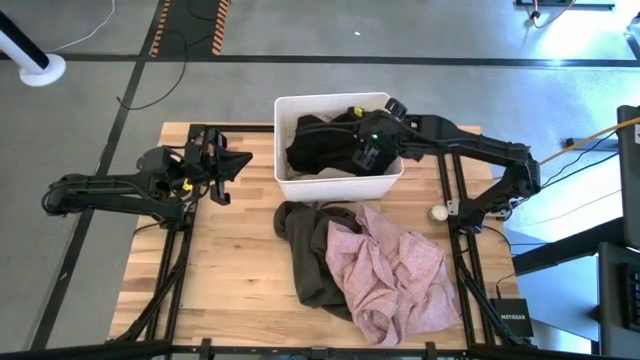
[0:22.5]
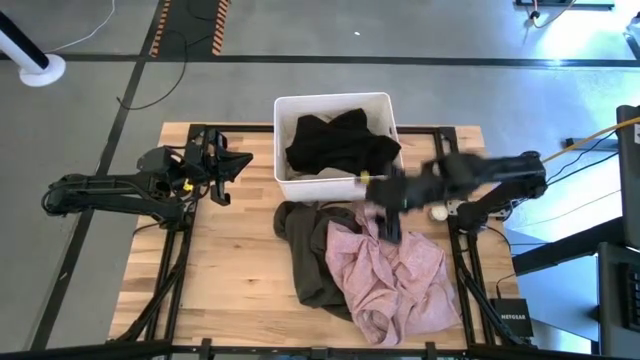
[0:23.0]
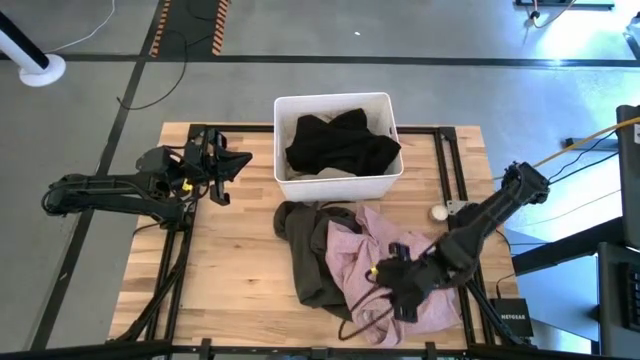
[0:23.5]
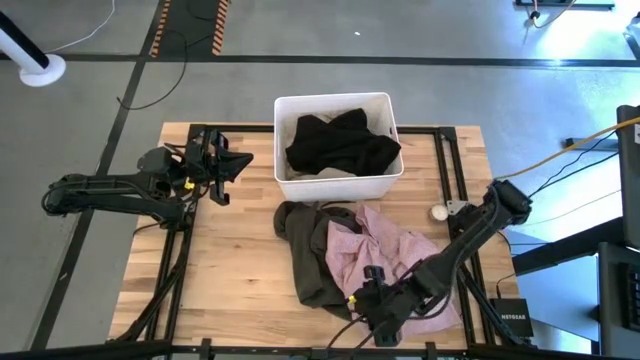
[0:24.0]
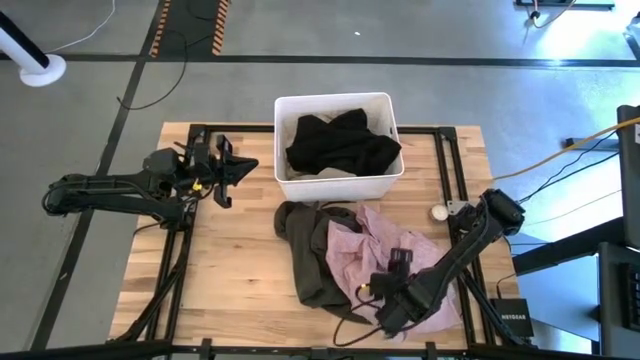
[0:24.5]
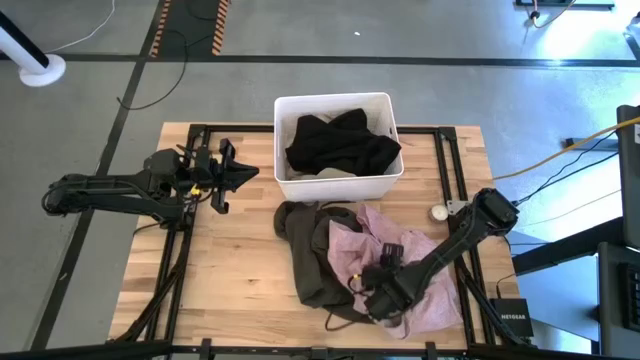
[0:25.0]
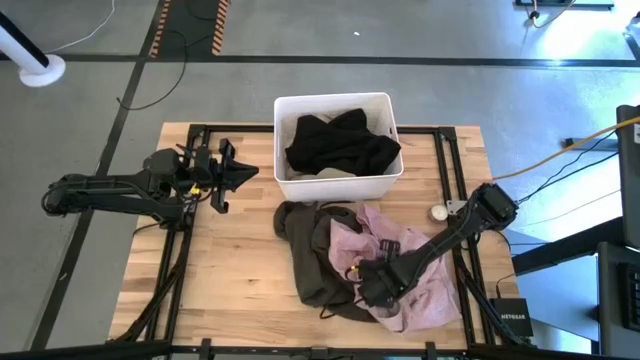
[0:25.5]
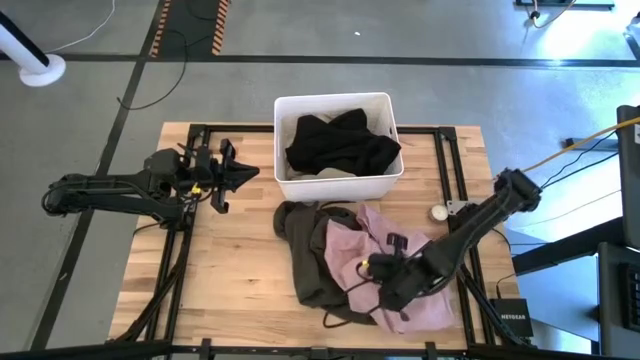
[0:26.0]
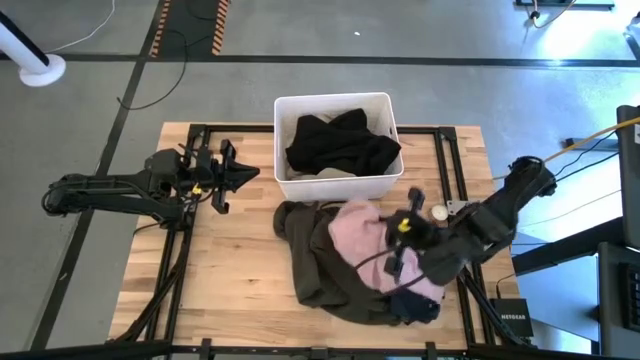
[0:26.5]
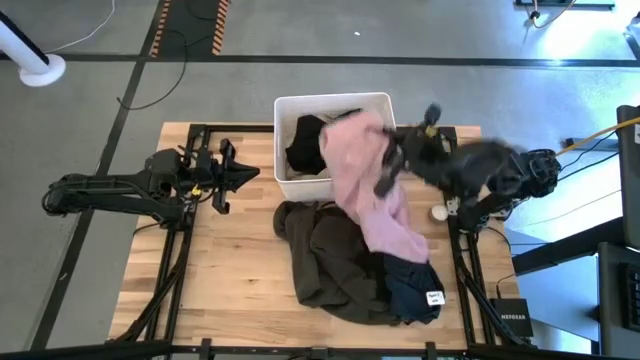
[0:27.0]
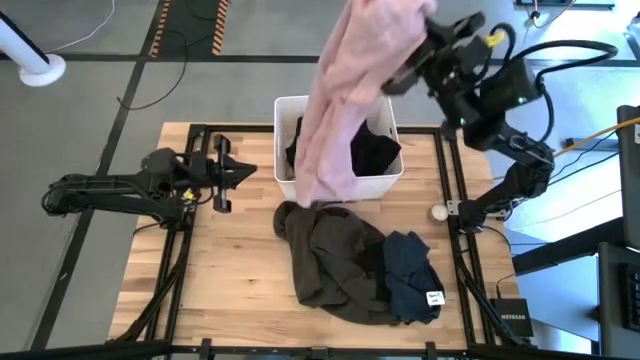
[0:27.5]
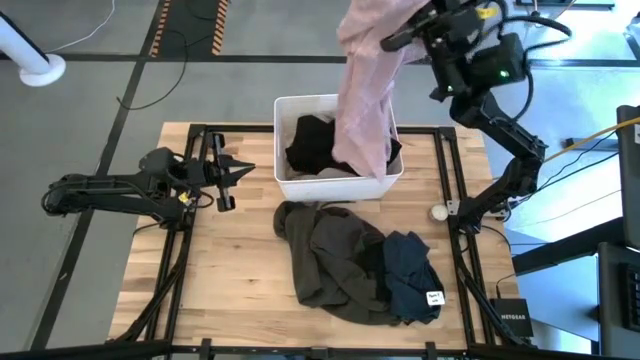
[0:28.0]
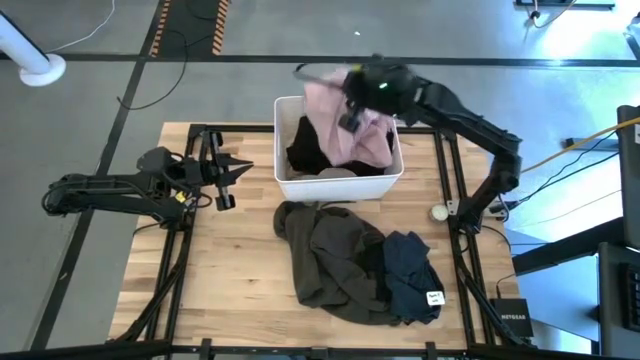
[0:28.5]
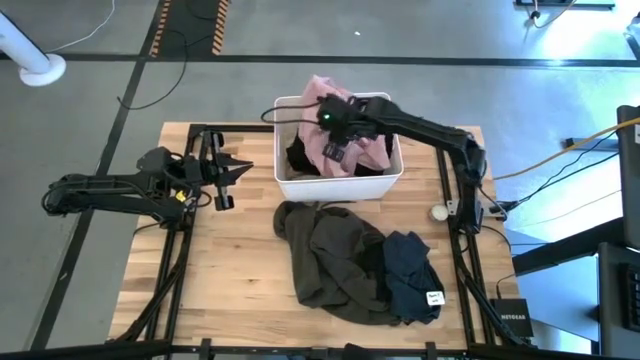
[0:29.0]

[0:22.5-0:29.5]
Task: Sort clothes
Put the pink shirt into the white laundry bin

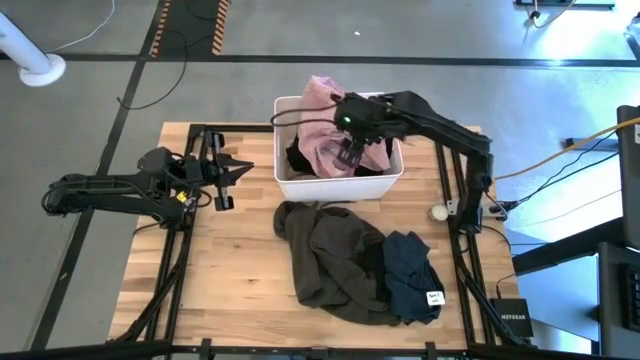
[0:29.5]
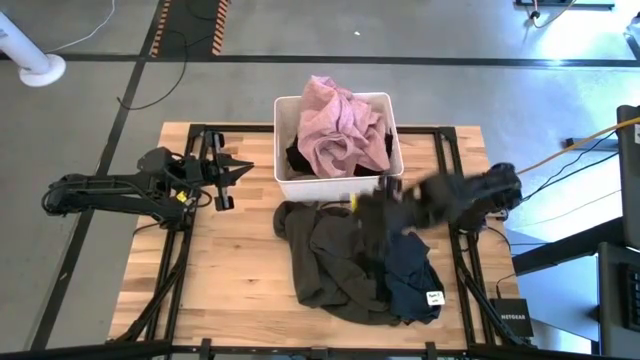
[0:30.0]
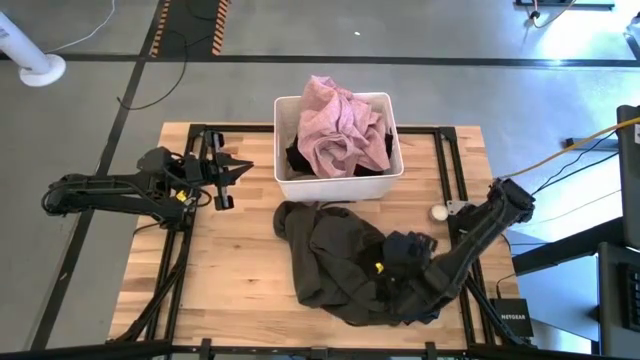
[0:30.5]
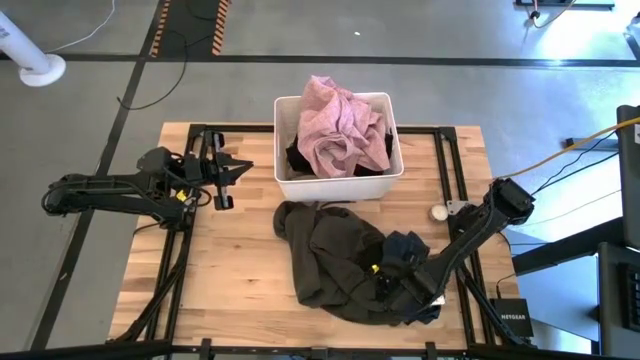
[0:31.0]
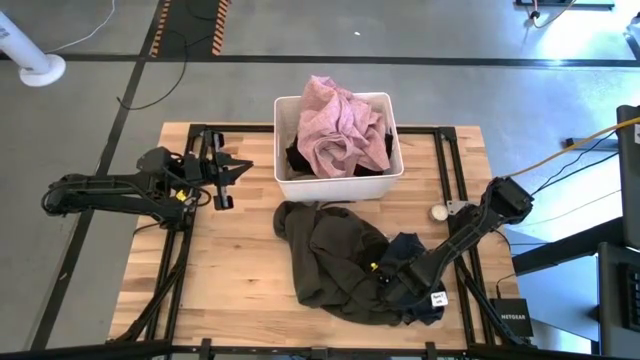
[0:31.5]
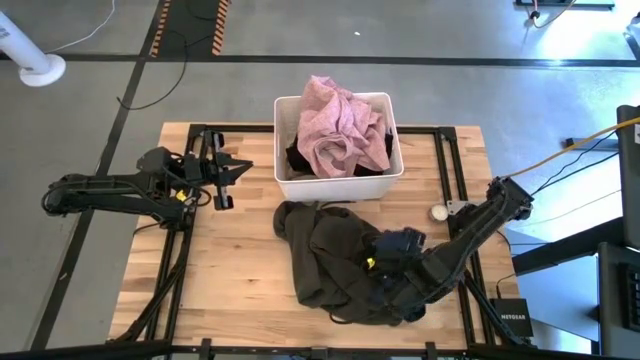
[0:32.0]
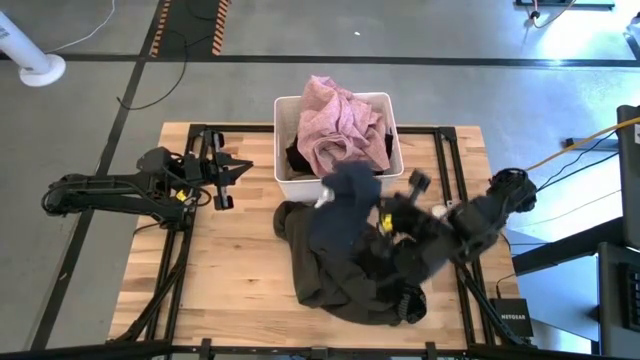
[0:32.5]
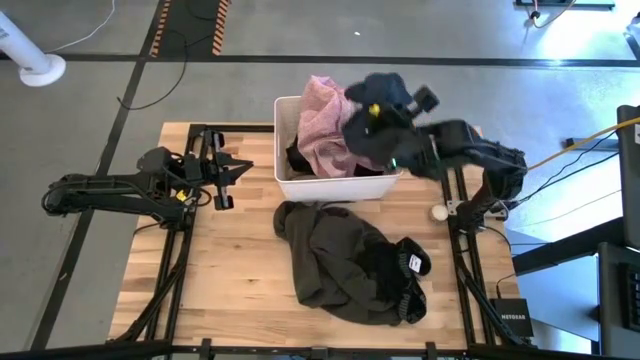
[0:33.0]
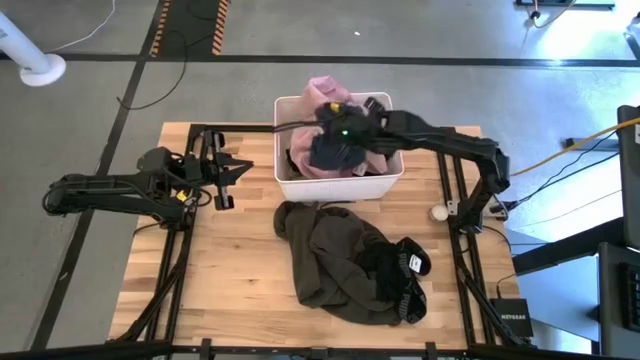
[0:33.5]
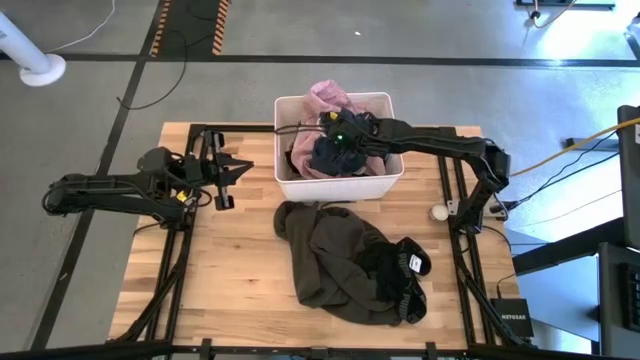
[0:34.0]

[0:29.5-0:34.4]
Put the gray garment into the white laundry bin

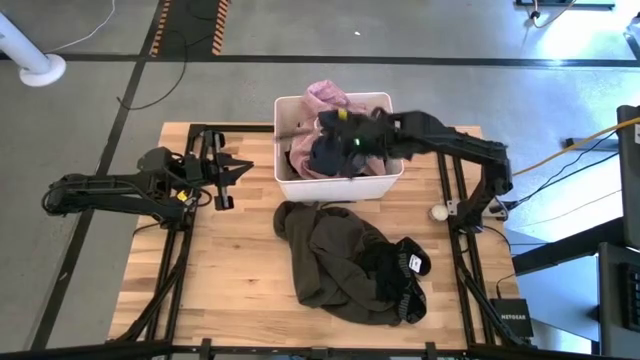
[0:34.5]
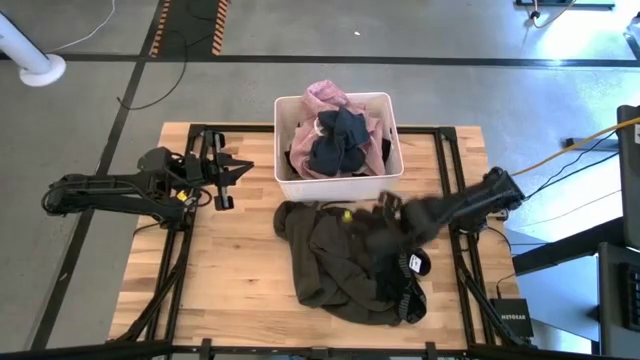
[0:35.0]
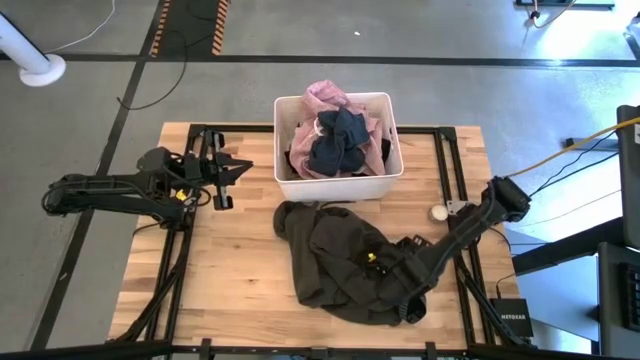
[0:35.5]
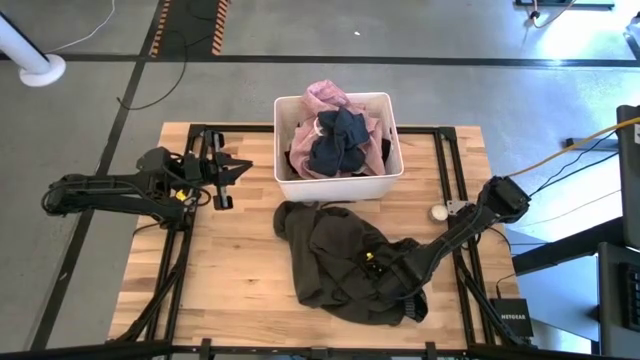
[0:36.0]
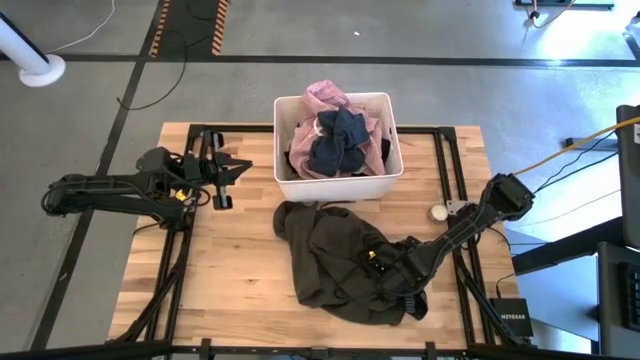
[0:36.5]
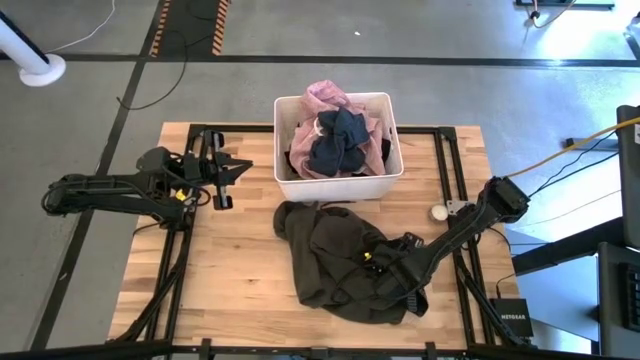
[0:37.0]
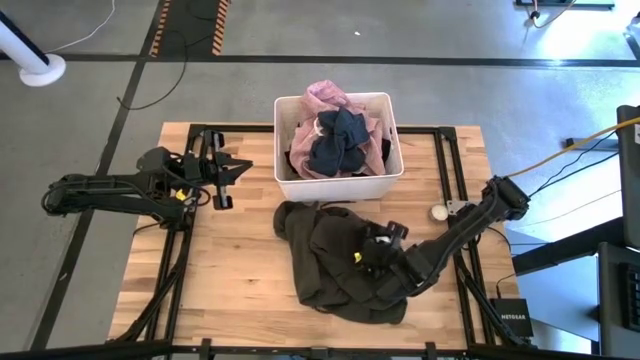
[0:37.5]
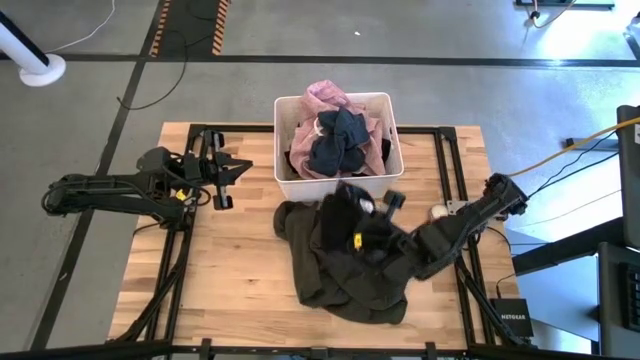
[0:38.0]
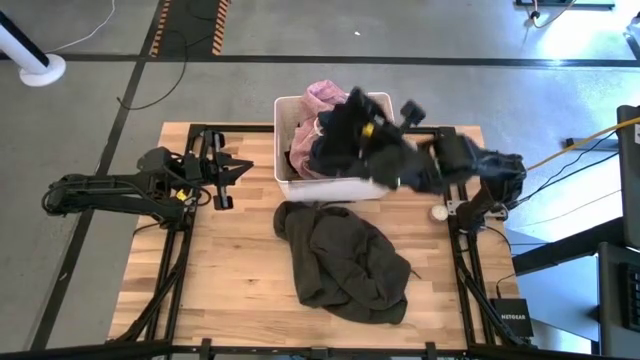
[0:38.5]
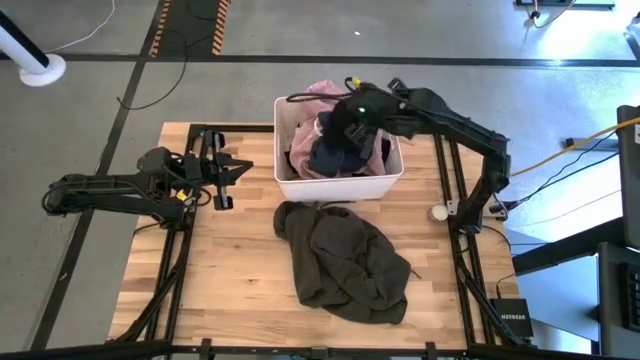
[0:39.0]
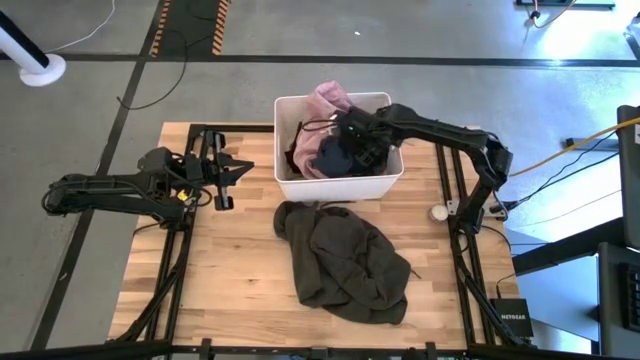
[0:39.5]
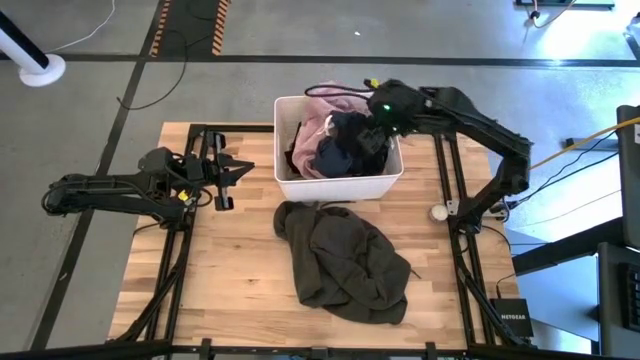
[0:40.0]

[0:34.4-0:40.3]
Put the black underwear into the white laundry bin

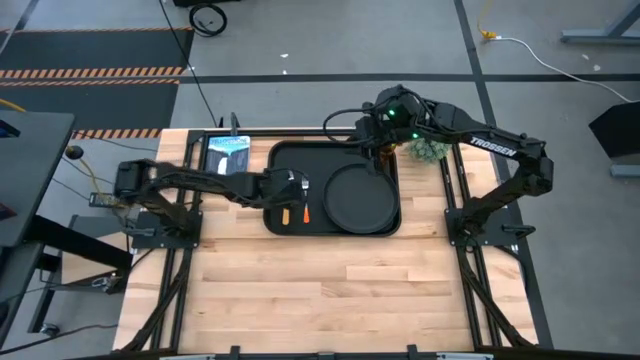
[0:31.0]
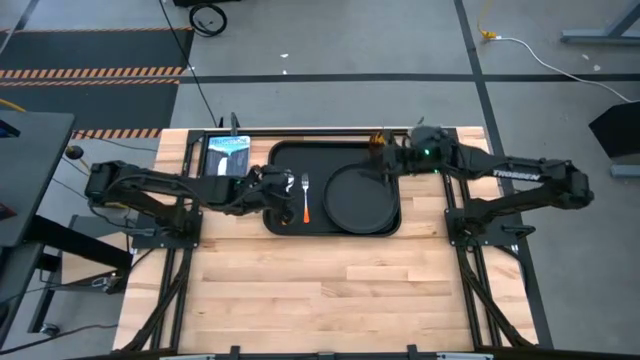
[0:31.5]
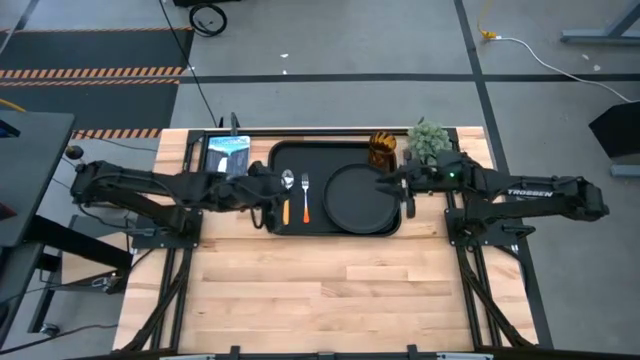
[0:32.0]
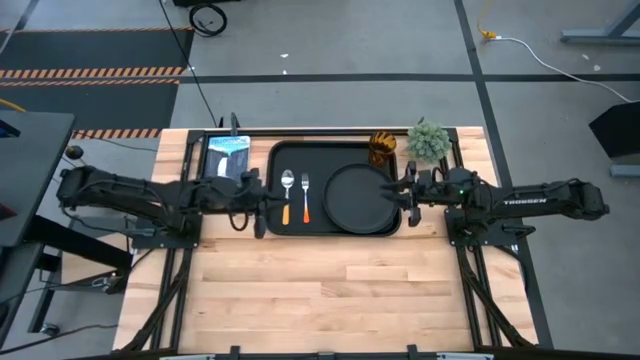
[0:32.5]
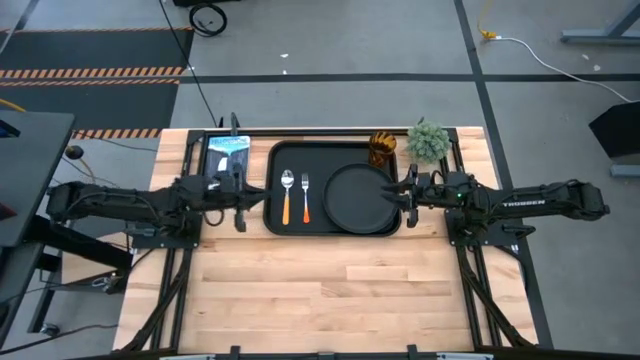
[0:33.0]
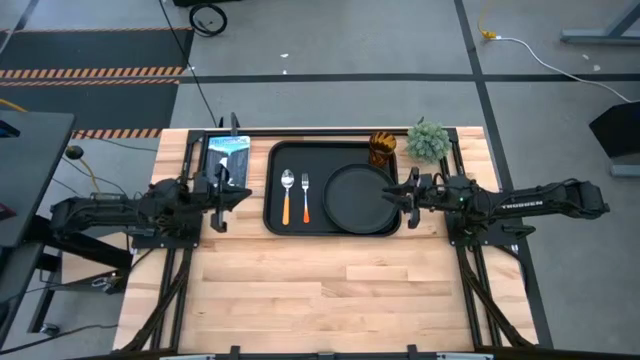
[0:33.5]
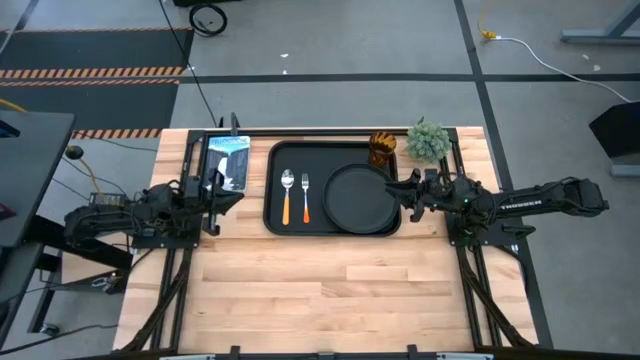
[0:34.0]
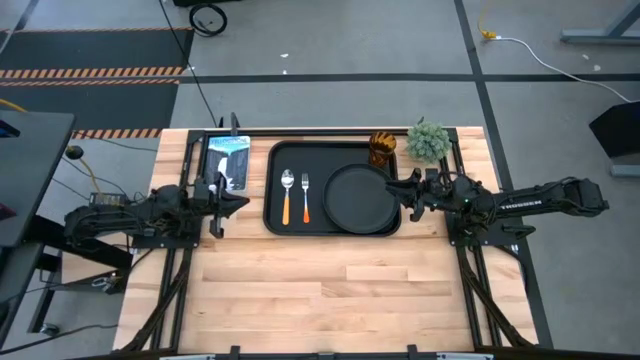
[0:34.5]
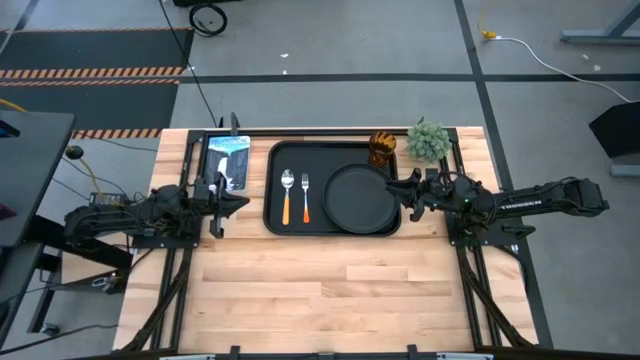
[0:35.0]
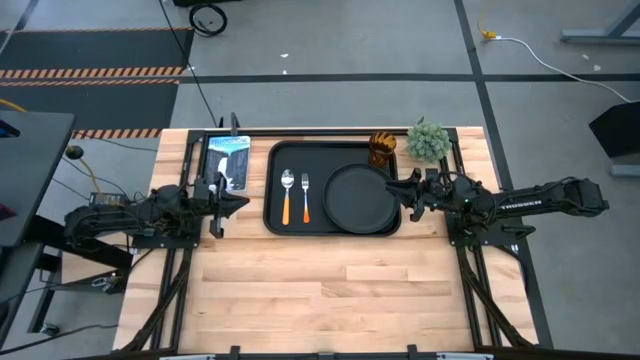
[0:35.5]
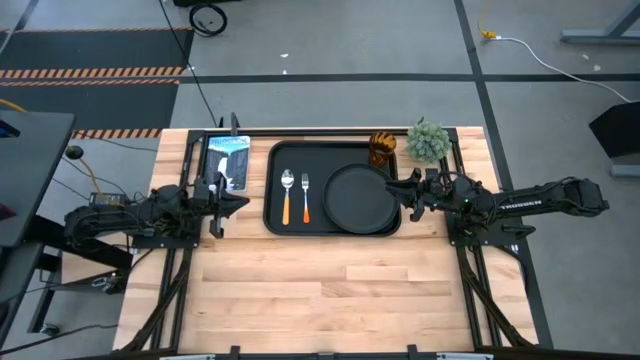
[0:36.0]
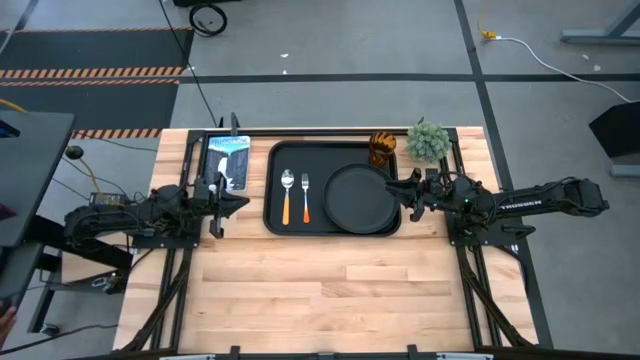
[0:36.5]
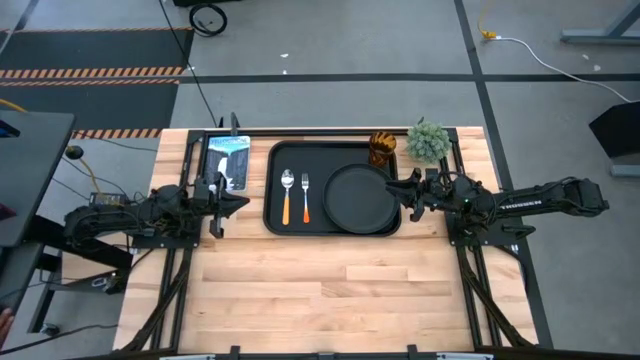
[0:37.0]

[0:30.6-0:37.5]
Task: Pick and place plate/cup/fork/spoon on tray
Return to Home Position
